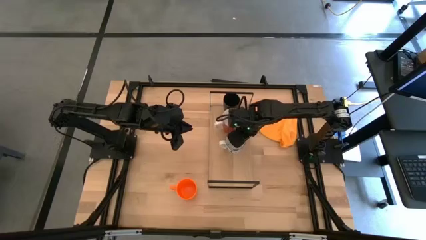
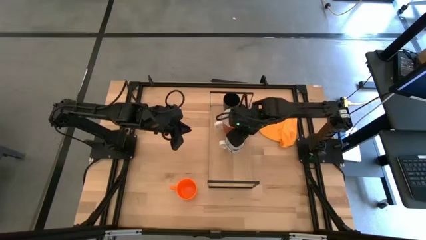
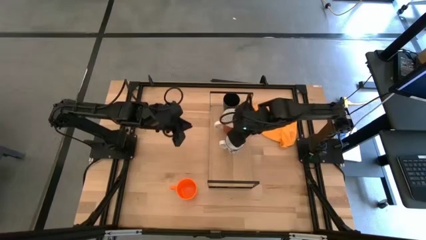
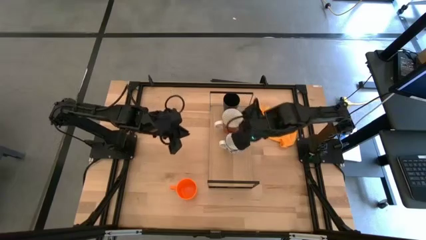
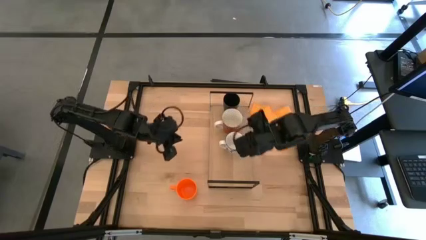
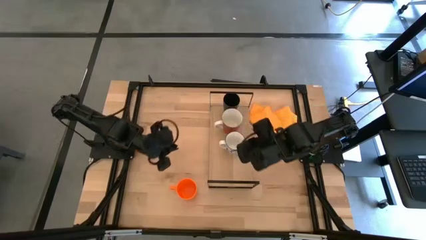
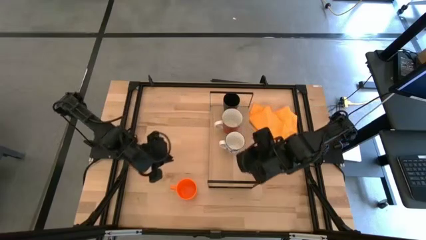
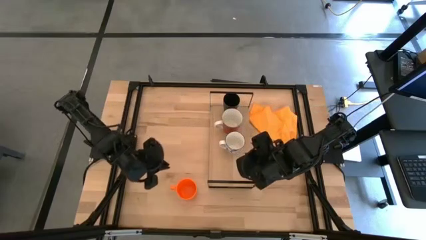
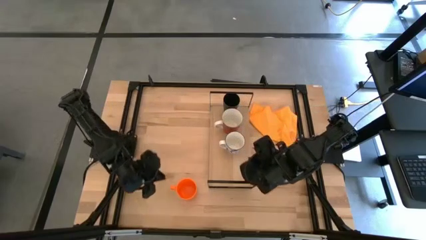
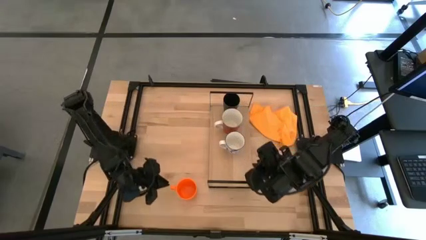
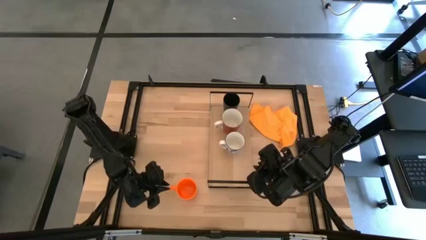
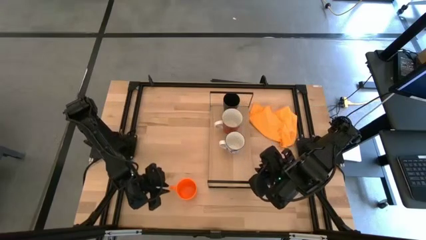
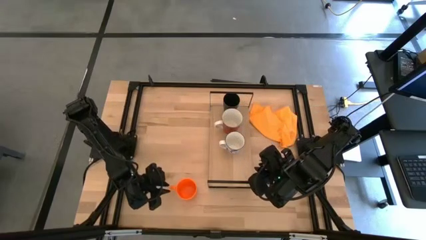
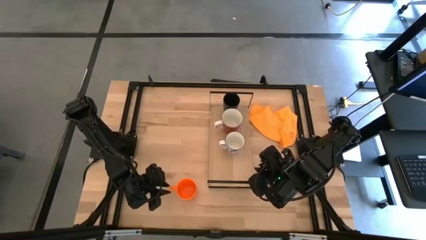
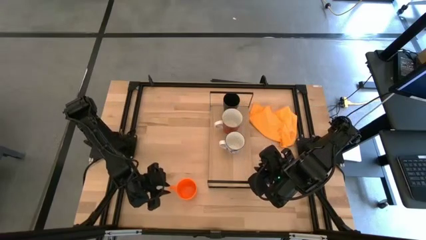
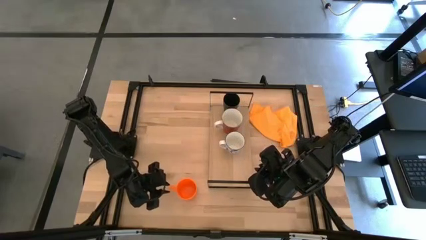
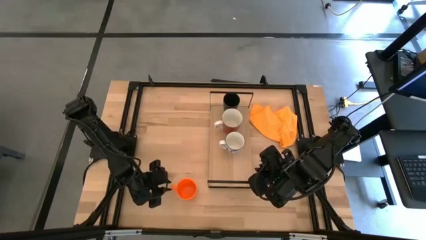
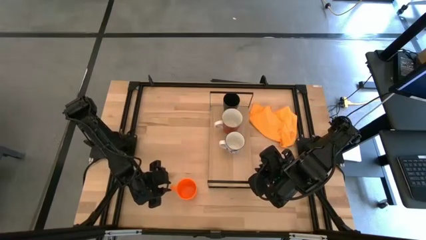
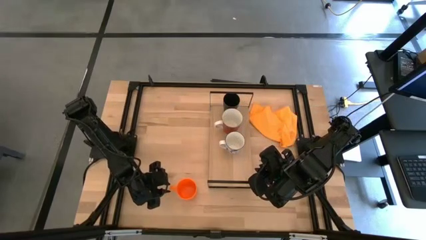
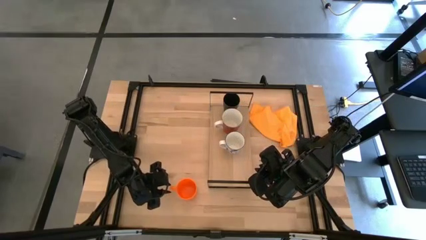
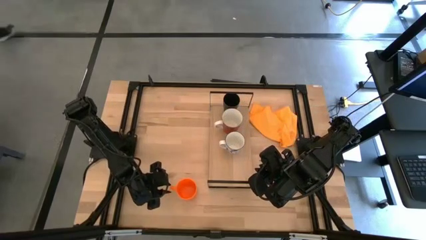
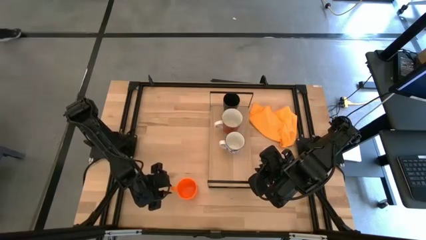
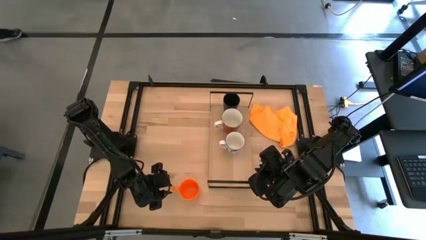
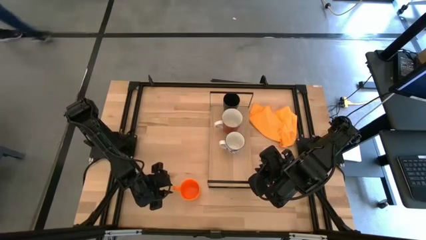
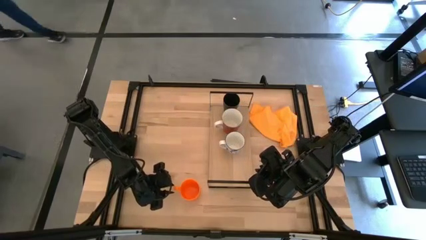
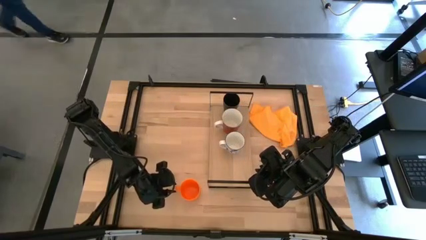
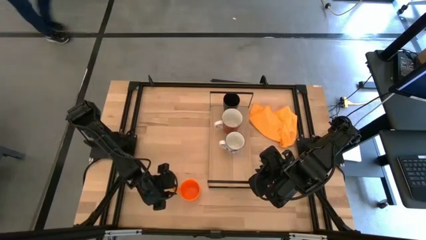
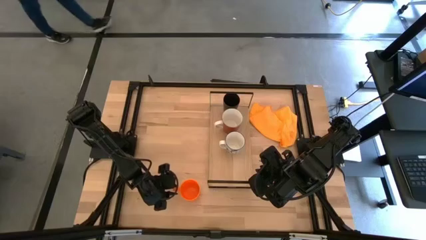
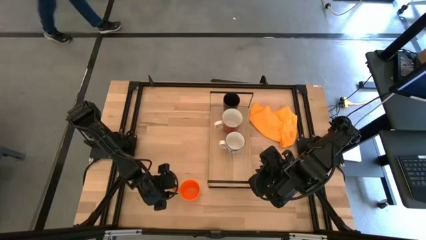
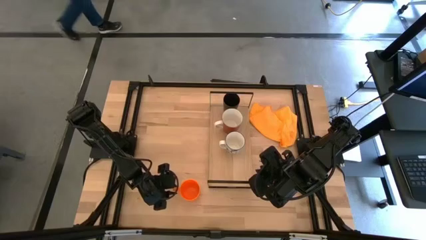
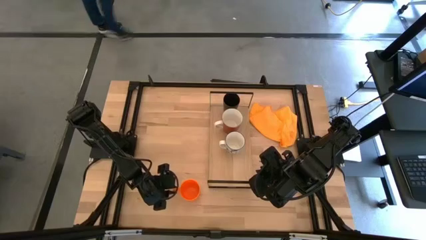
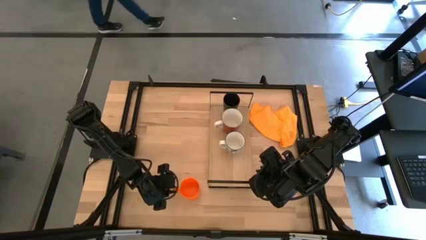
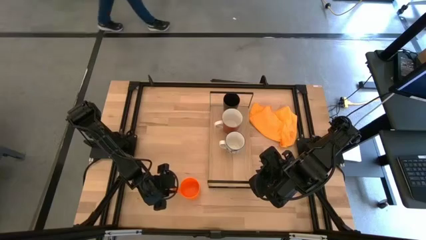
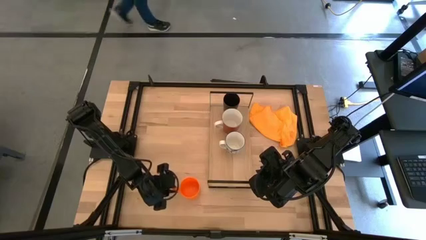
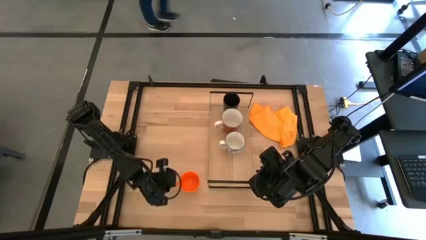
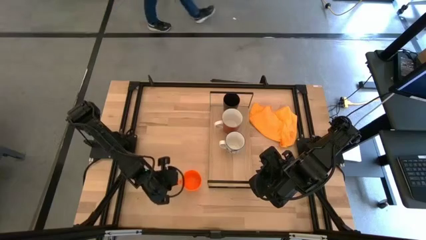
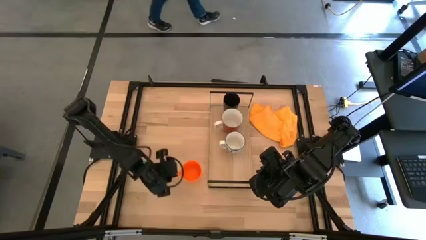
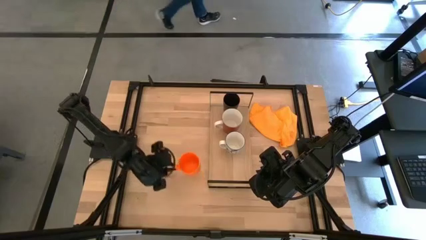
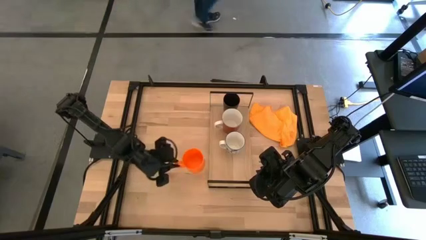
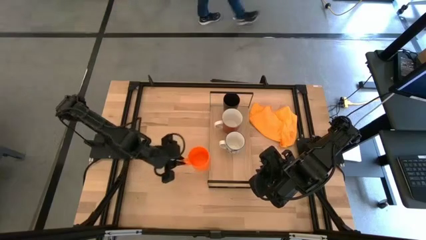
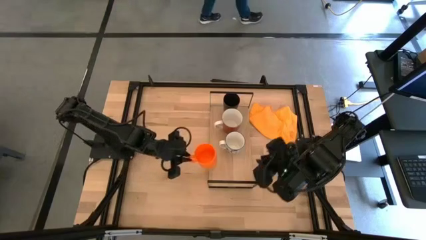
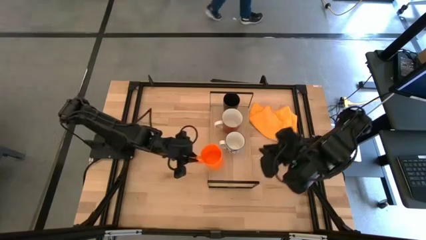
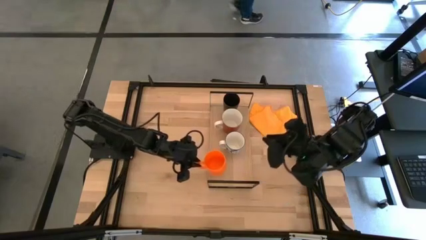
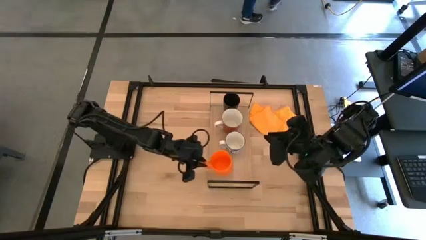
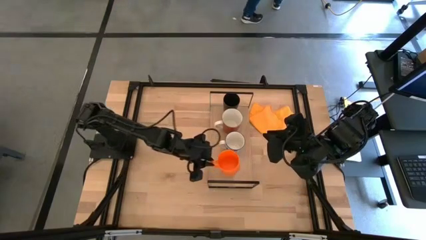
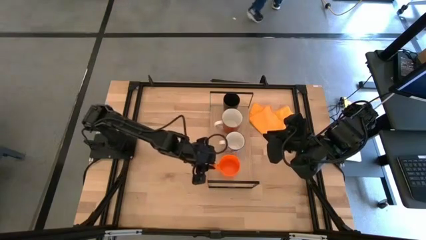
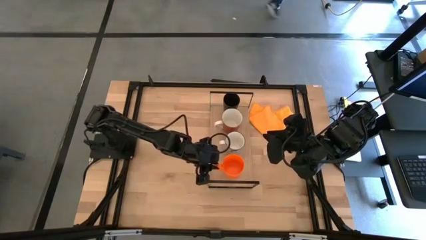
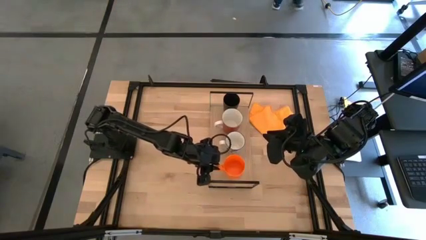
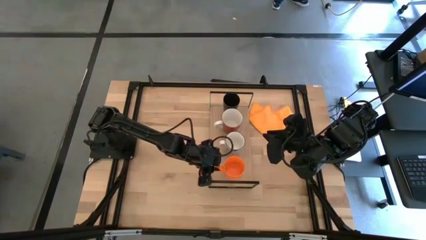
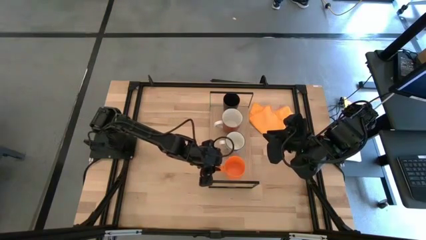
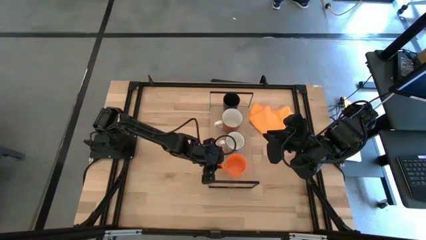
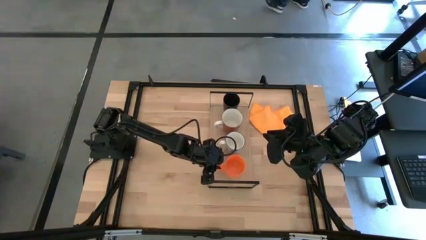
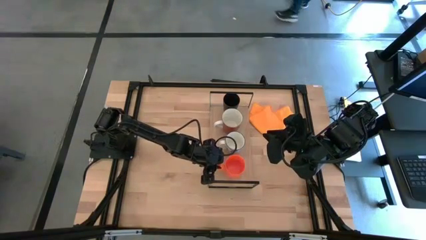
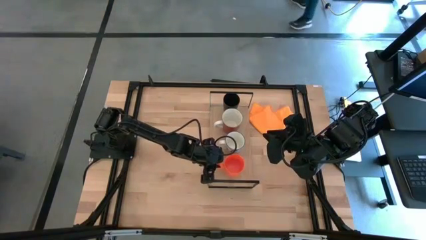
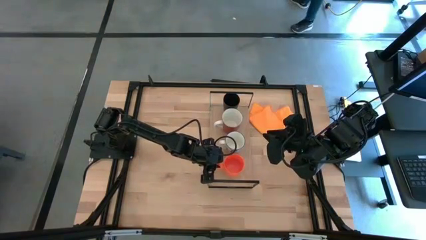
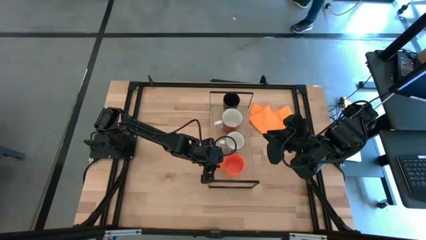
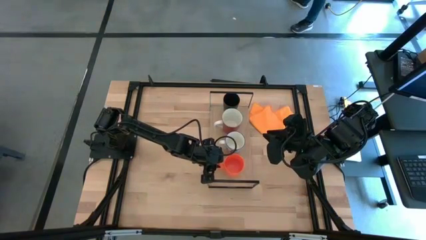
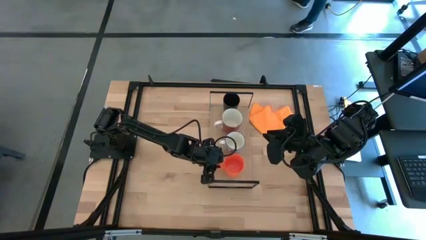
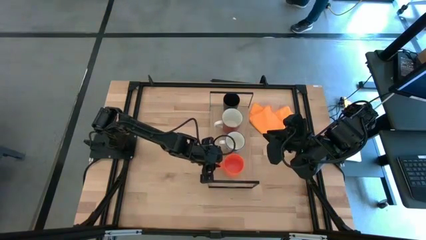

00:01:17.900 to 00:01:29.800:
Task: Stack small to large cups/mugs on shelf
Put the orange mug align with the white pattern cup on the shelf

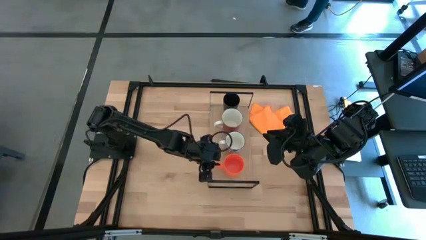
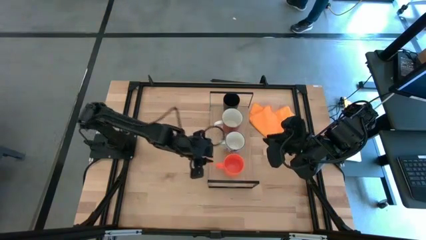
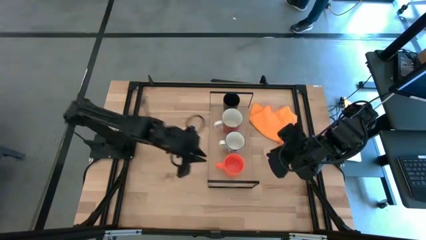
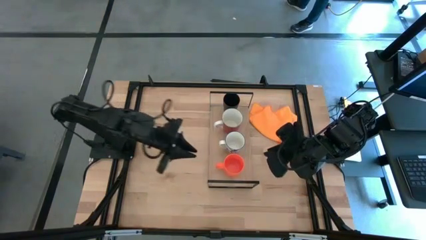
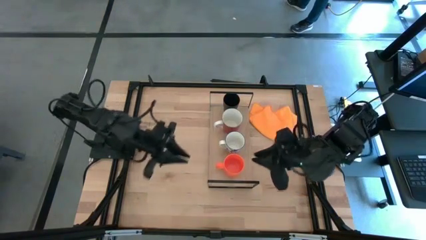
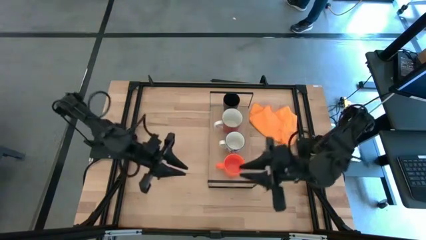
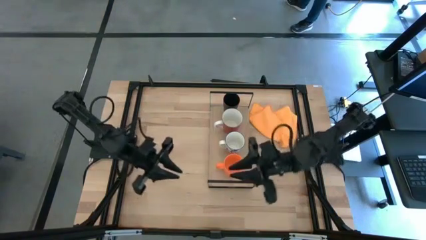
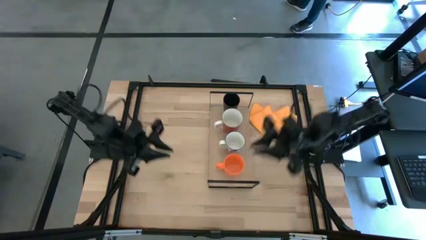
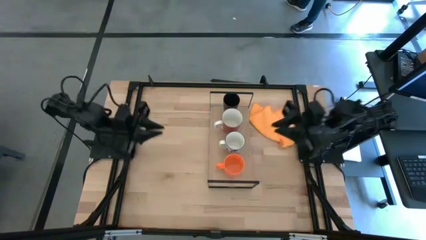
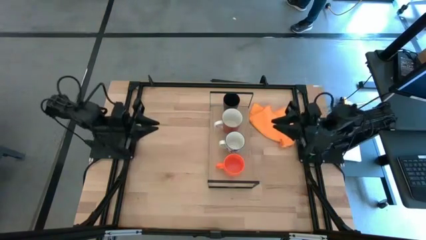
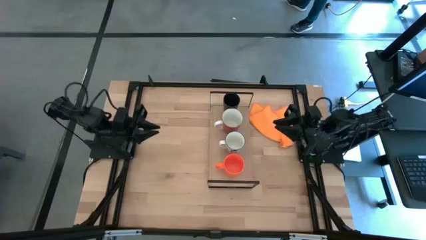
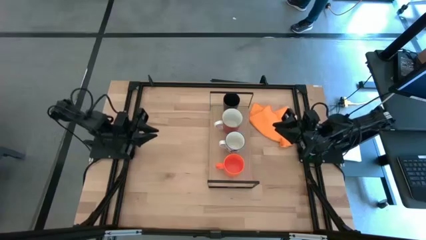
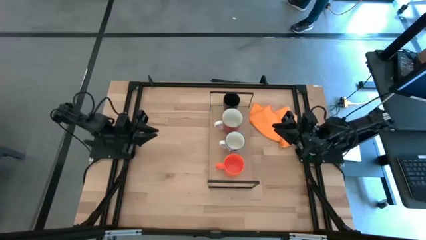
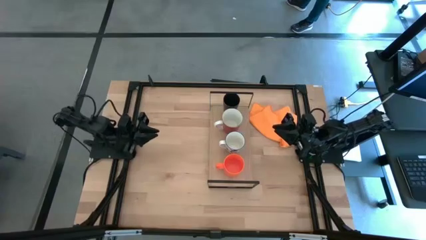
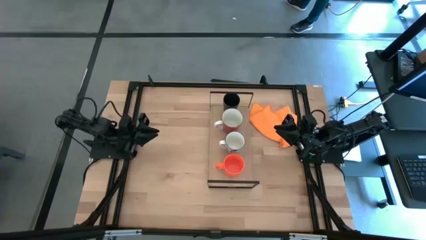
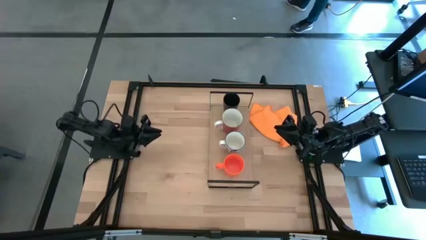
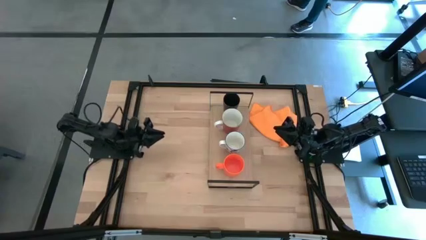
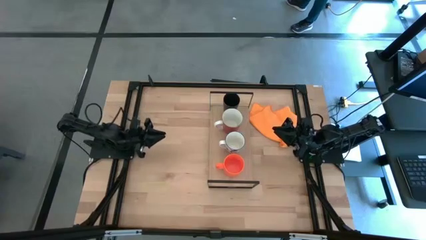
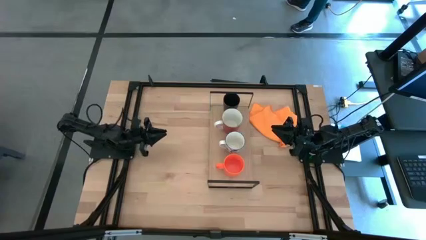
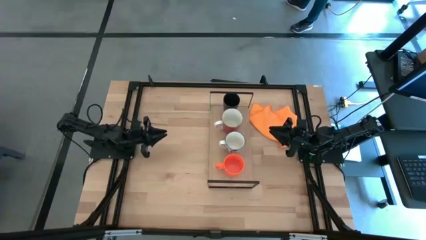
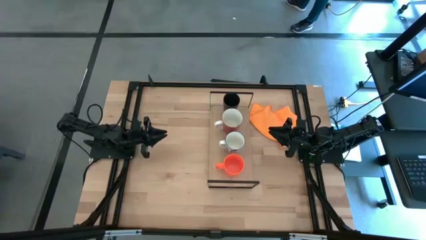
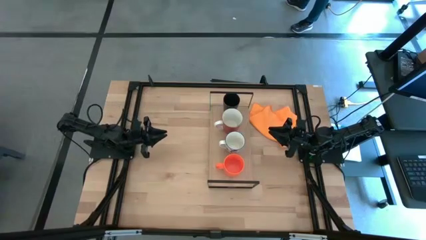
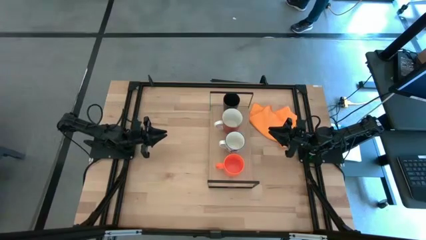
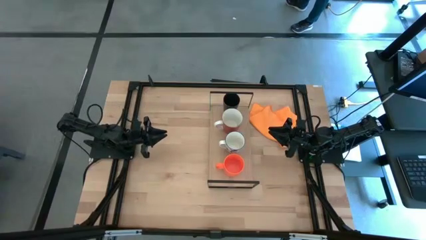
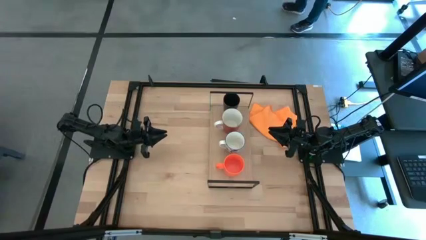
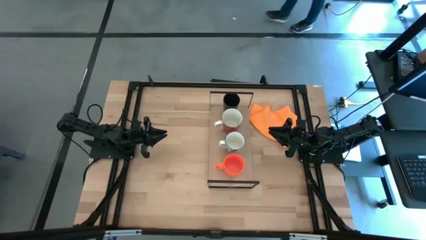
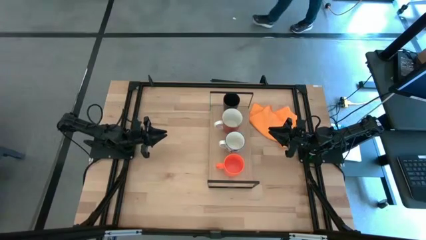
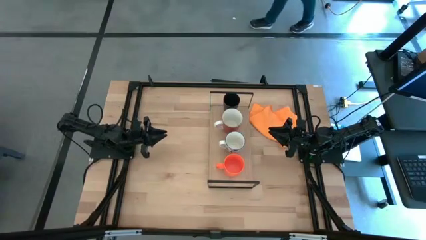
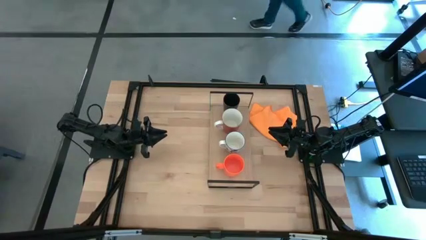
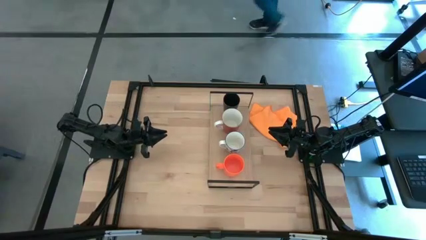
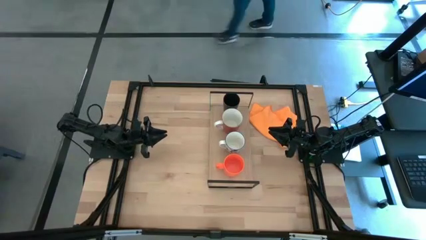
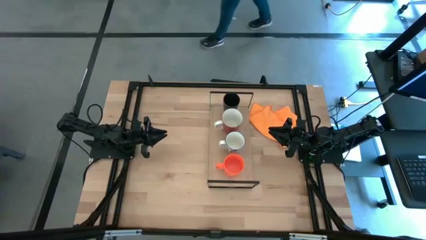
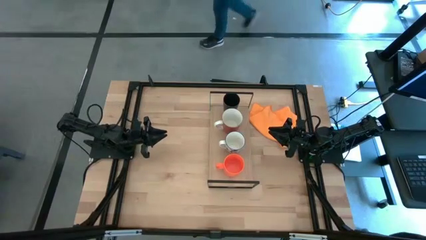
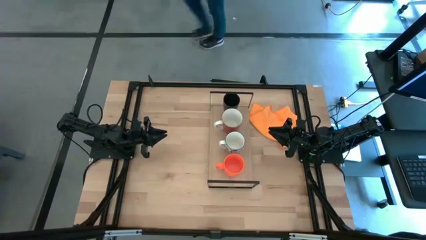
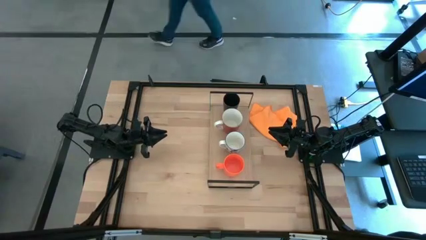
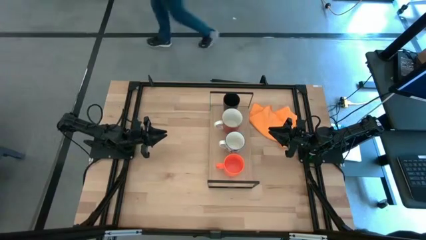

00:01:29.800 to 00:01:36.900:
Return to Home Position
